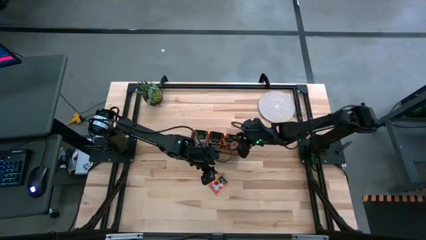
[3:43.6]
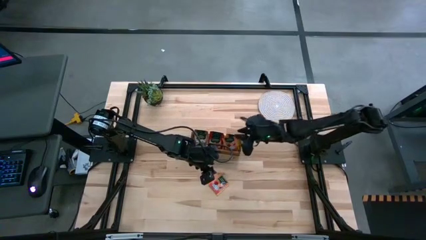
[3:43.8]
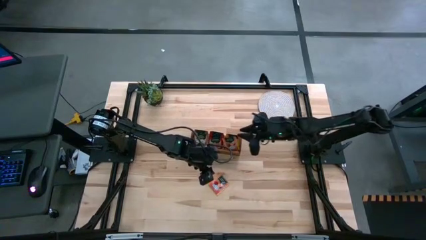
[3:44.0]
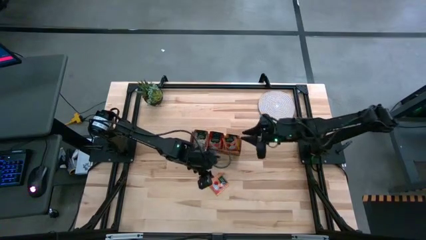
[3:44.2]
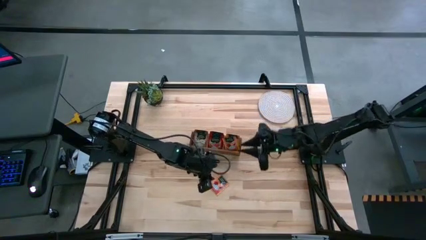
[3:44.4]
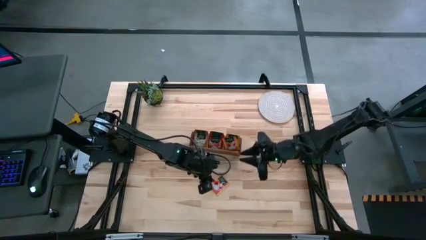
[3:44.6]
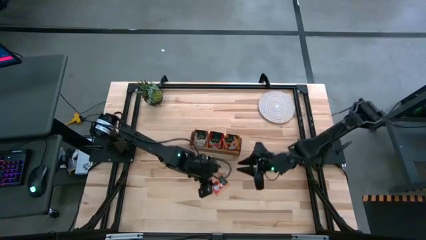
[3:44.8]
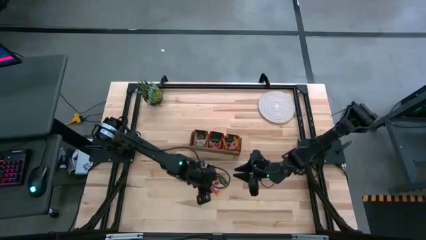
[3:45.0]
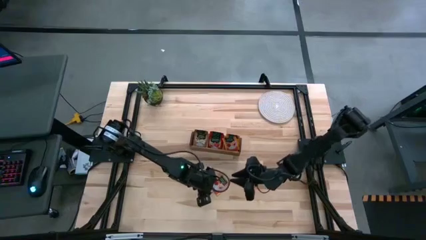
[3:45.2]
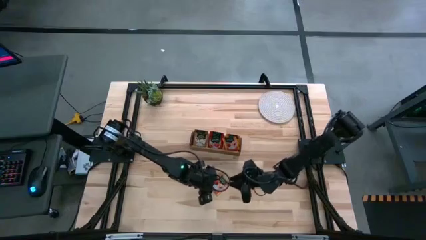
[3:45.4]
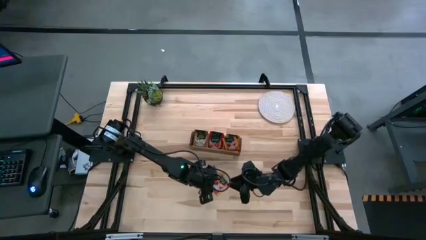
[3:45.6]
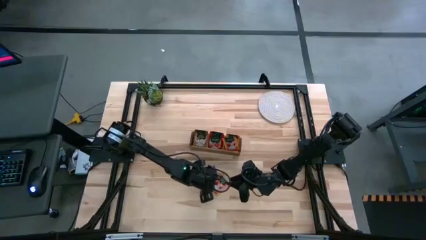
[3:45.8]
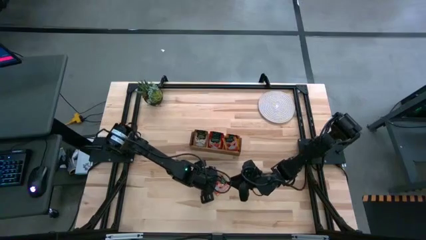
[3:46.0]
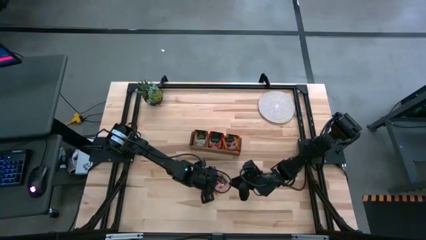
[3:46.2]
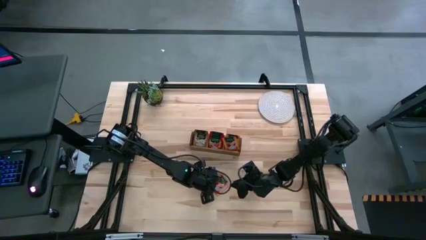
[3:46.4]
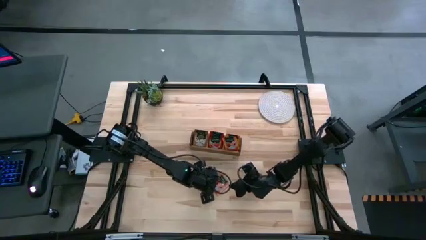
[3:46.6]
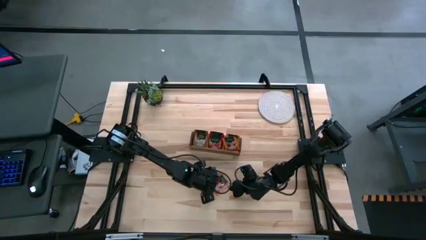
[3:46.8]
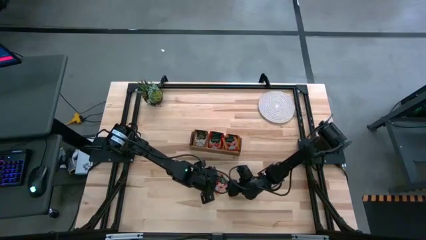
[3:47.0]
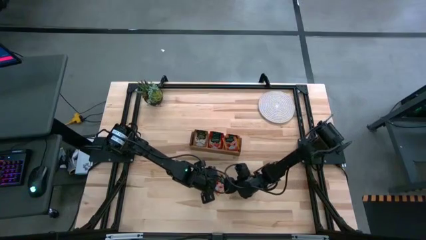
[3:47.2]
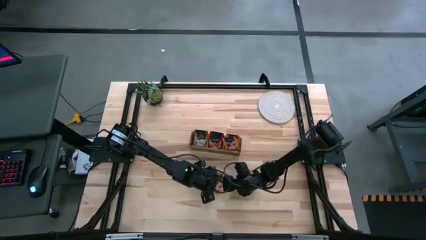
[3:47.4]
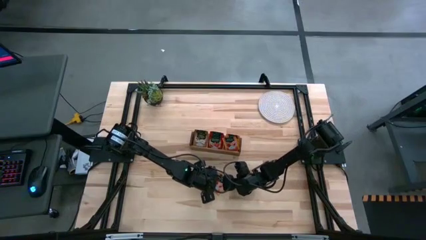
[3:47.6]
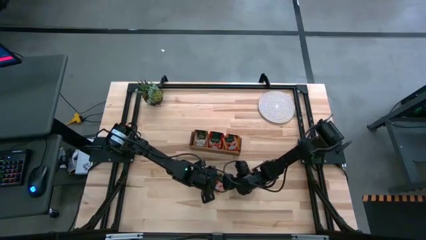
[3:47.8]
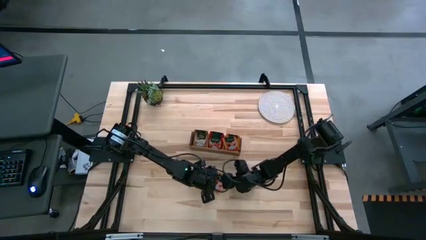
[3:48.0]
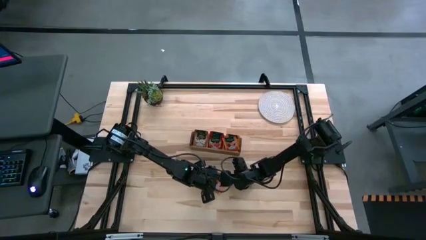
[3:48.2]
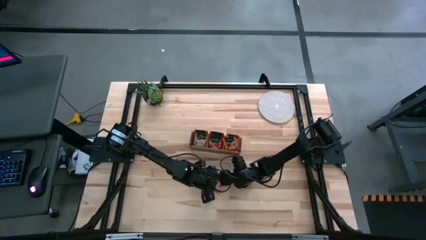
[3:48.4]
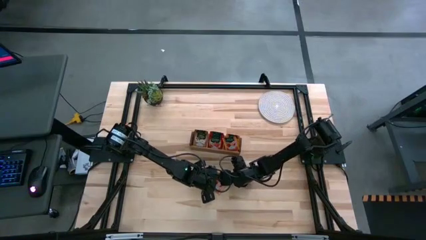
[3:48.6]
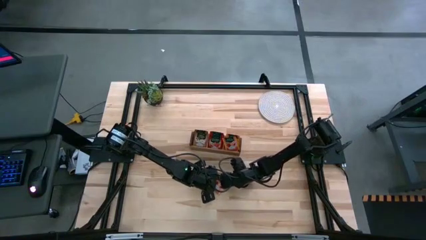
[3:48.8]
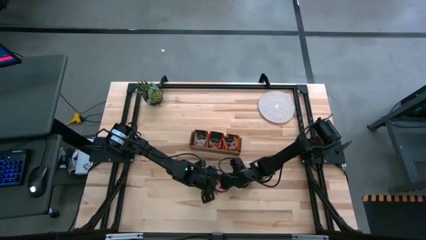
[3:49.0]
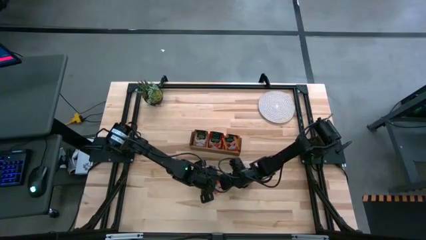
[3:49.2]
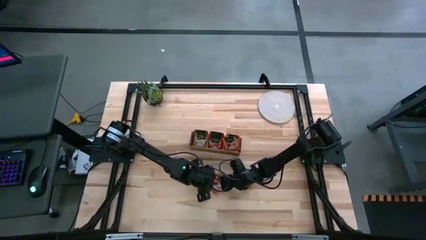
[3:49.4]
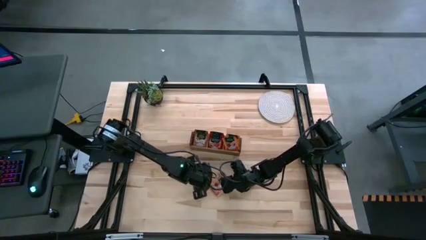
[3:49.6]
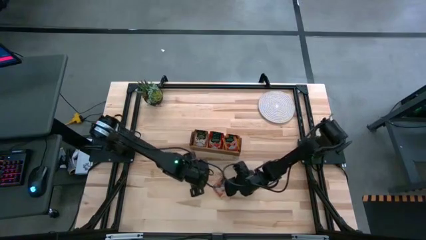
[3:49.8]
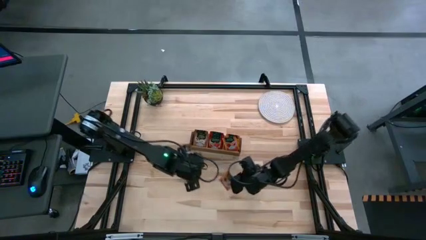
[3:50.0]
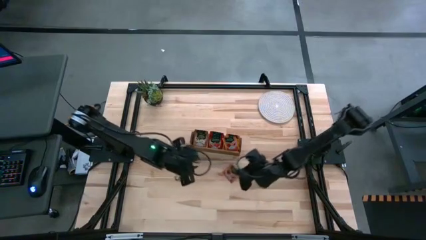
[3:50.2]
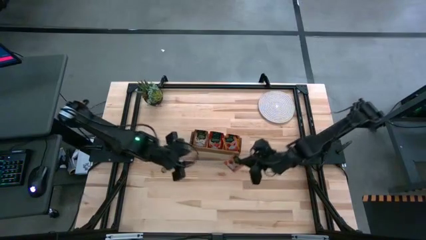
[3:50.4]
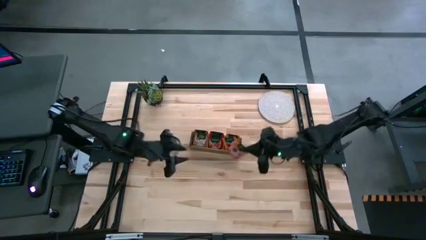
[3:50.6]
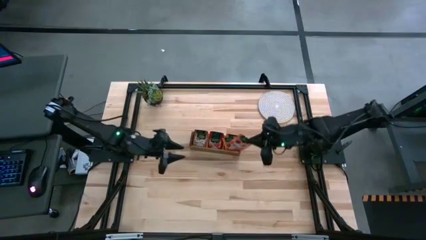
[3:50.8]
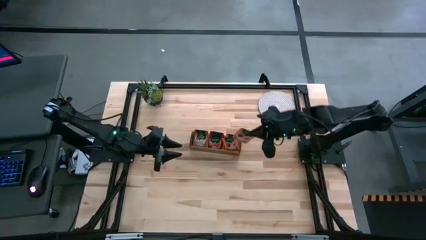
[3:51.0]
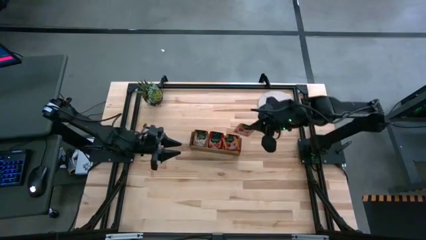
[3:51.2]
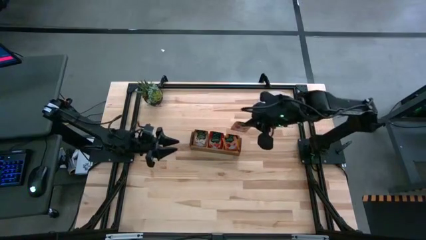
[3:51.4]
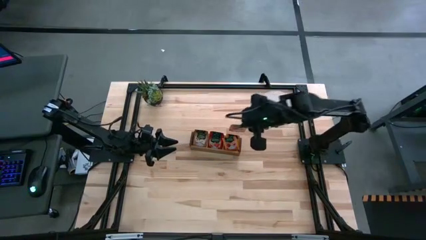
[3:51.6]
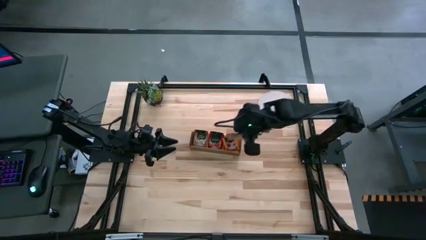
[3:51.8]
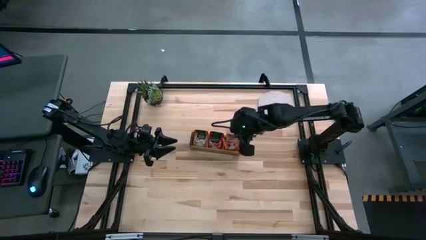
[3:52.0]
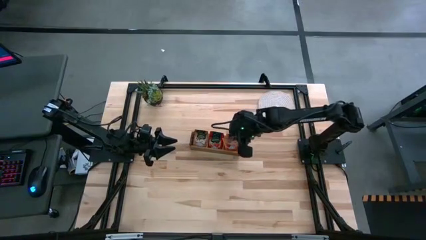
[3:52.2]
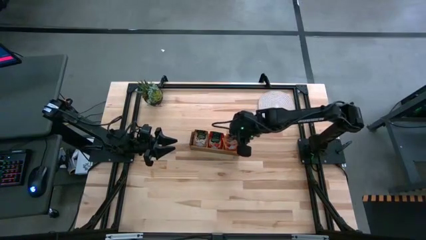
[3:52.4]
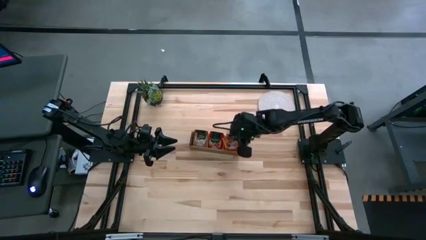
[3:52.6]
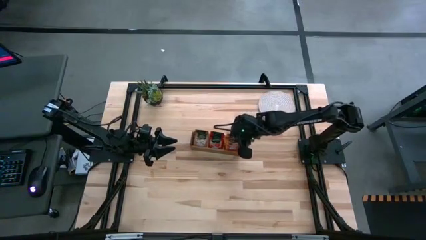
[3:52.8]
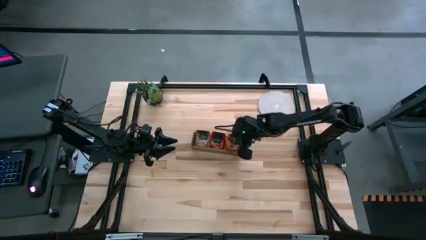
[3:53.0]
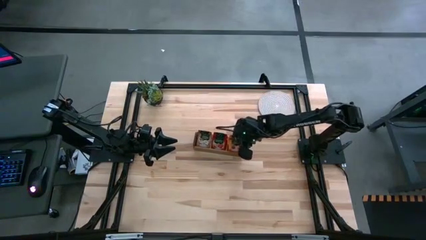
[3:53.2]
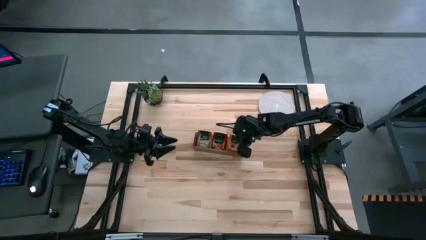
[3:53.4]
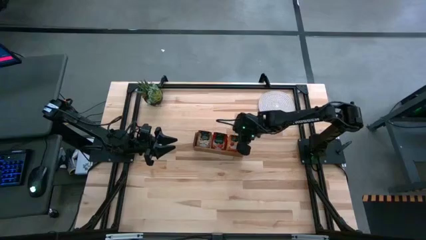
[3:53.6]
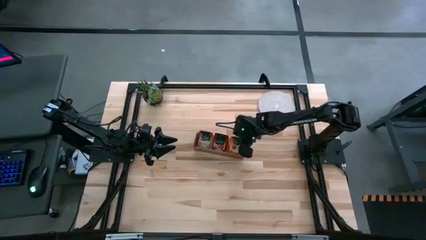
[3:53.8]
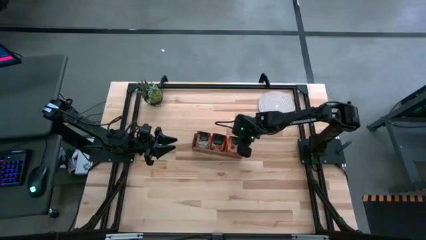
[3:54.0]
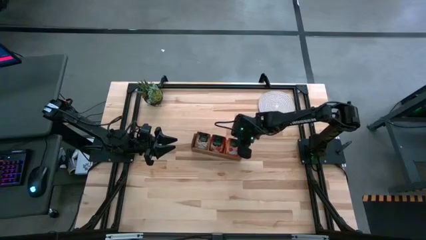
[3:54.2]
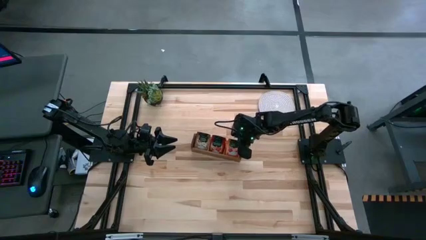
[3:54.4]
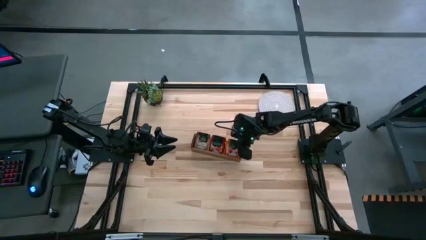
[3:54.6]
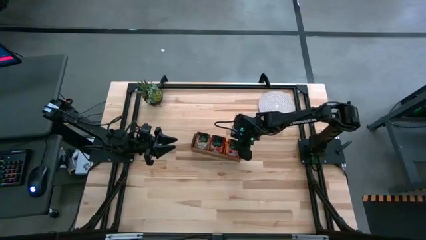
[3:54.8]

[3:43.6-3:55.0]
Task: Pick & Place Tea
Put the orange tea bag into the right section of the brown wooden organizer

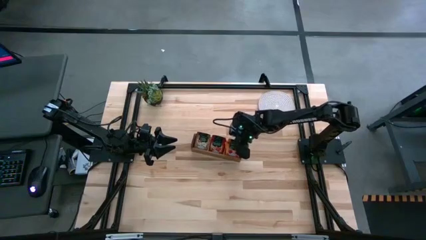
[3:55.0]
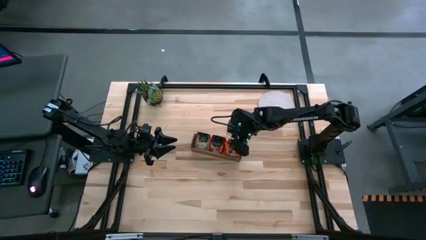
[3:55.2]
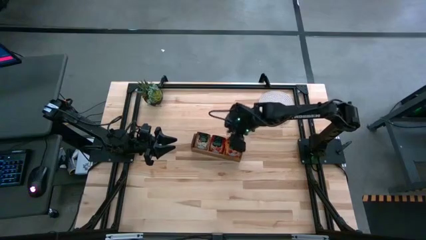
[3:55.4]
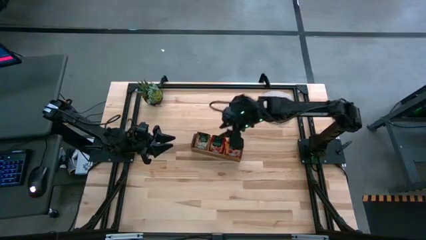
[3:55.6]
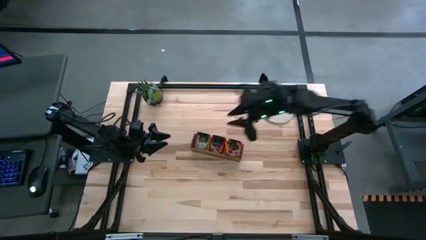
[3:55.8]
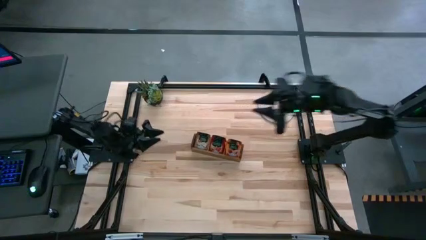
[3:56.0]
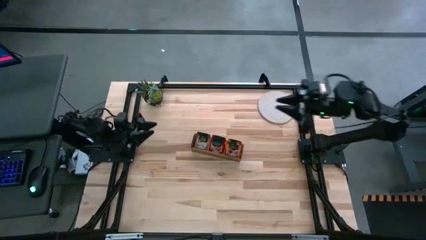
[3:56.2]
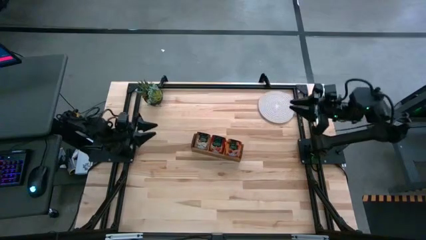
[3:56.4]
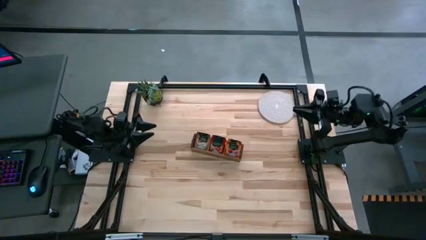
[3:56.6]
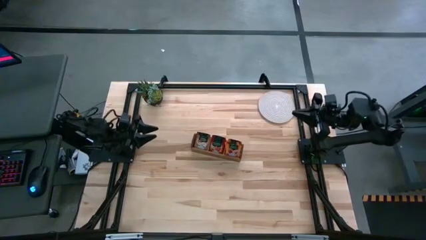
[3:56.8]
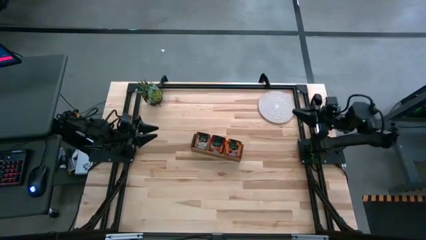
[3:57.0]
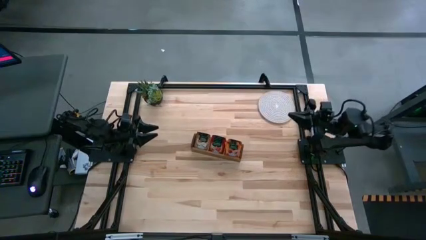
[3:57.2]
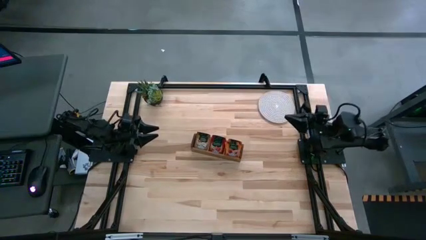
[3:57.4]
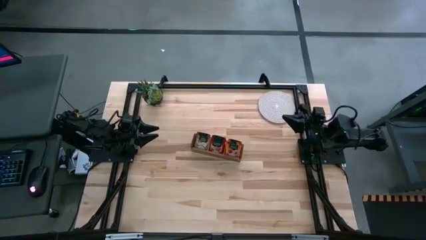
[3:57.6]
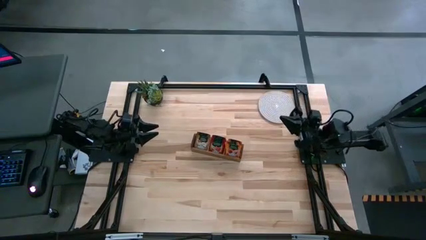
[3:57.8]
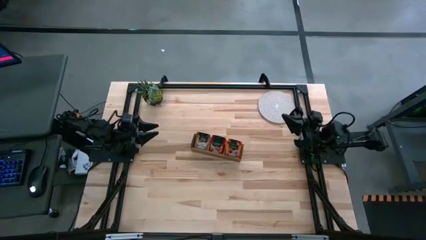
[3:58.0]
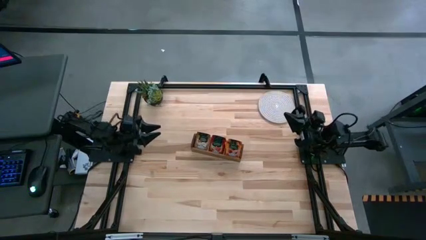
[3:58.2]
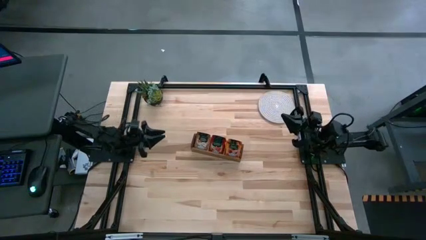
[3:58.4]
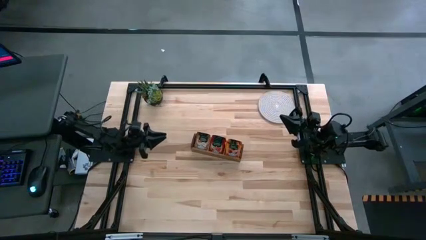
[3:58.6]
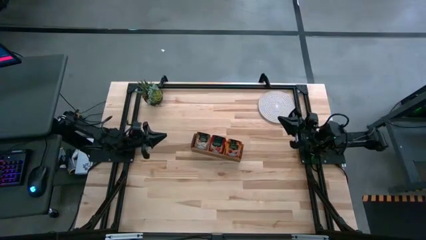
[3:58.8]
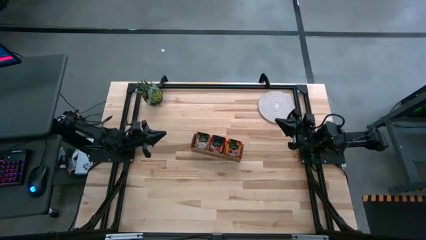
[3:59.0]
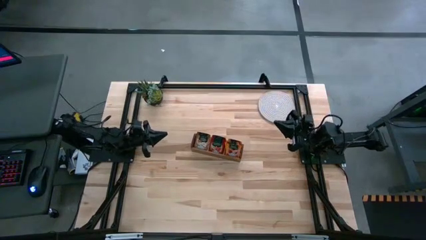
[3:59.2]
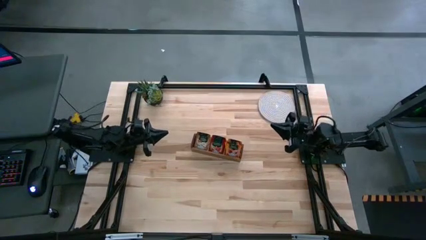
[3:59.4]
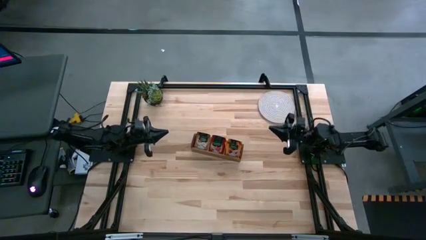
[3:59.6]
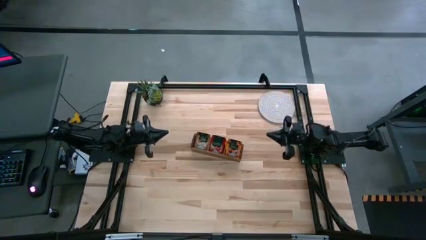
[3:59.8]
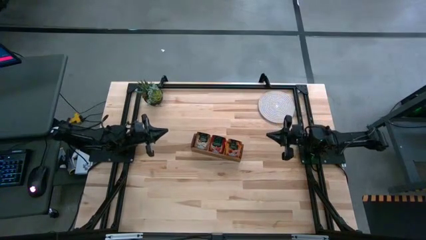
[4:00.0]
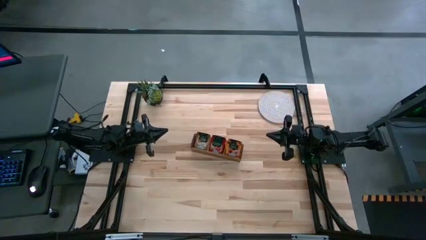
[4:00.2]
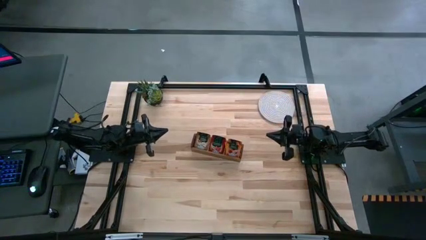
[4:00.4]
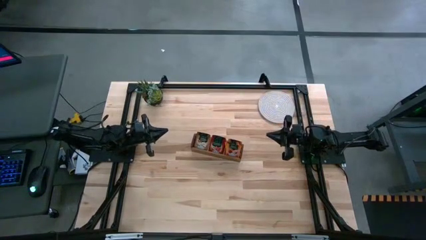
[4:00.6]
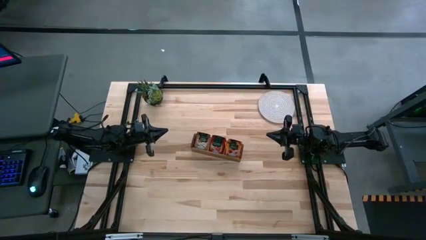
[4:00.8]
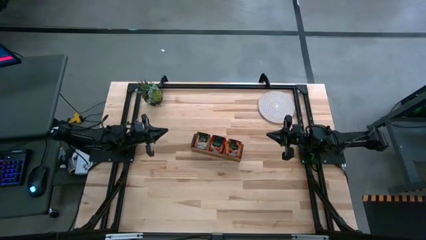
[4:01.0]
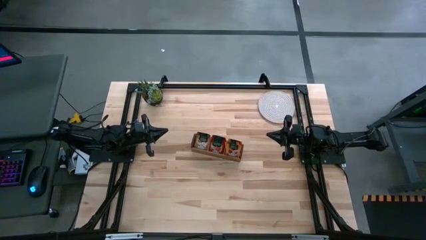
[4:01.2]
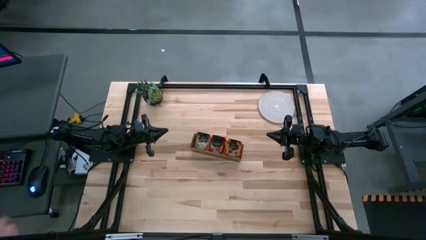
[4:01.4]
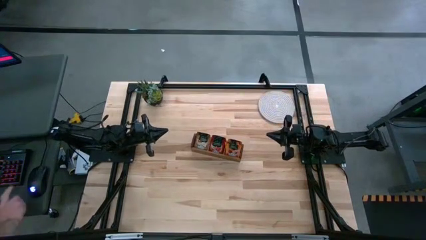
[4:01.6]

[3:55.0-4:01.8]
Return to Home Position
